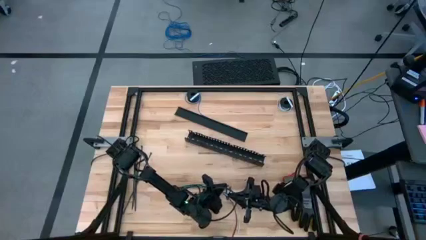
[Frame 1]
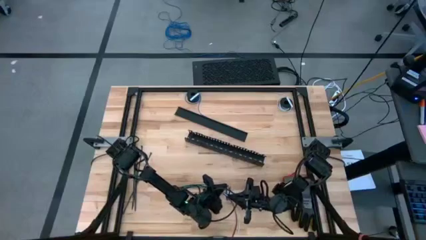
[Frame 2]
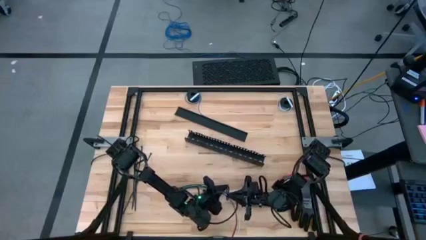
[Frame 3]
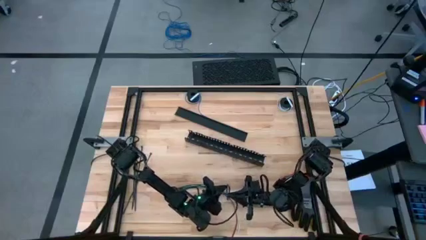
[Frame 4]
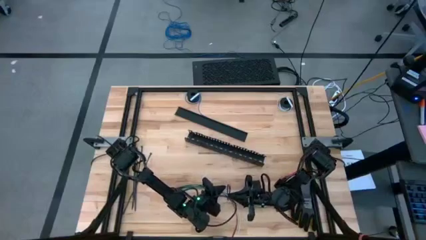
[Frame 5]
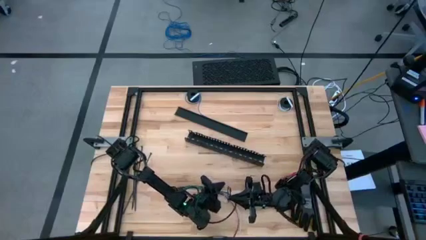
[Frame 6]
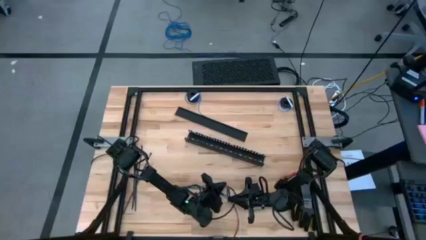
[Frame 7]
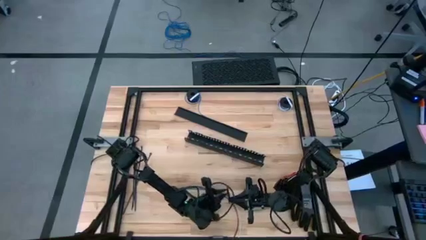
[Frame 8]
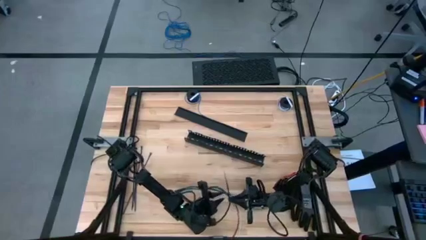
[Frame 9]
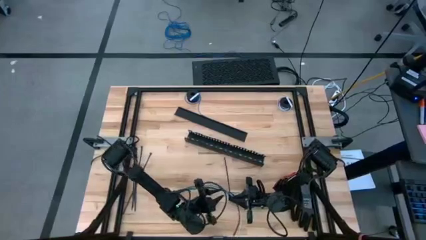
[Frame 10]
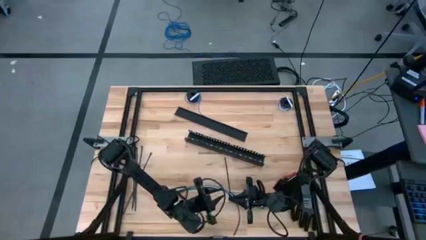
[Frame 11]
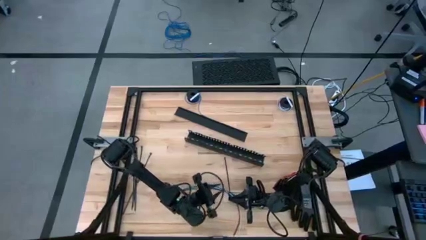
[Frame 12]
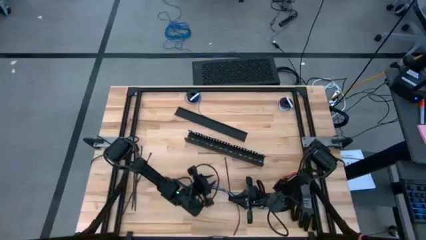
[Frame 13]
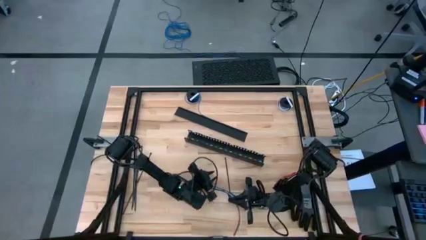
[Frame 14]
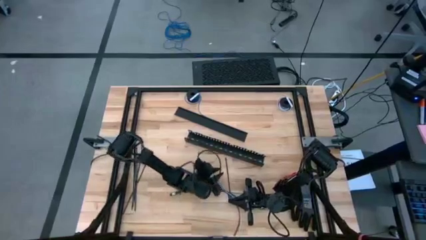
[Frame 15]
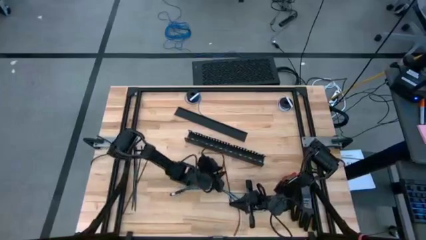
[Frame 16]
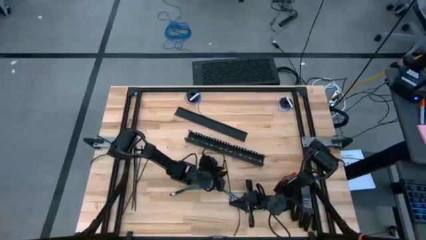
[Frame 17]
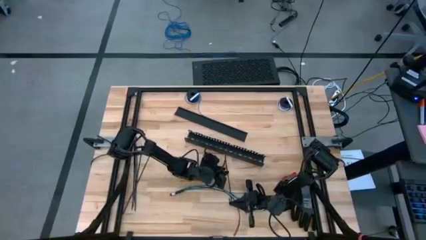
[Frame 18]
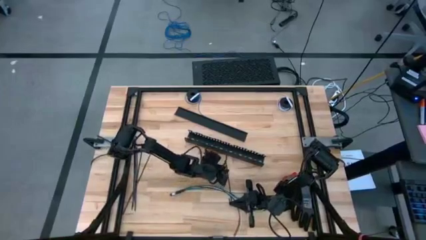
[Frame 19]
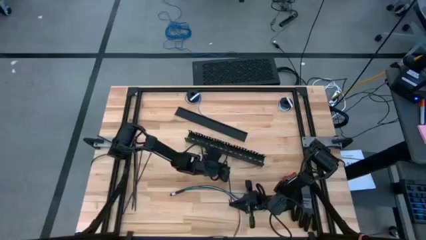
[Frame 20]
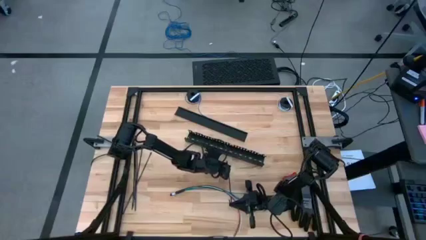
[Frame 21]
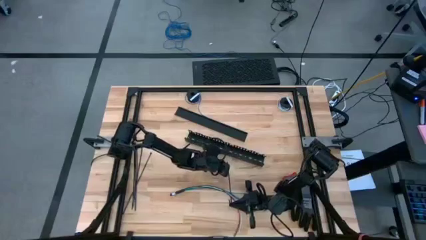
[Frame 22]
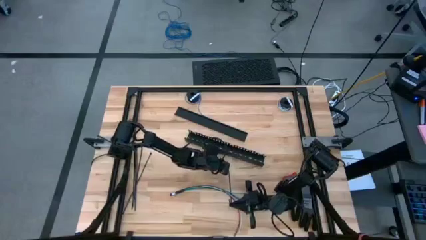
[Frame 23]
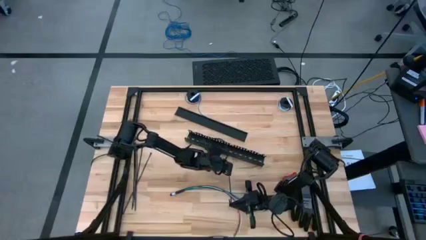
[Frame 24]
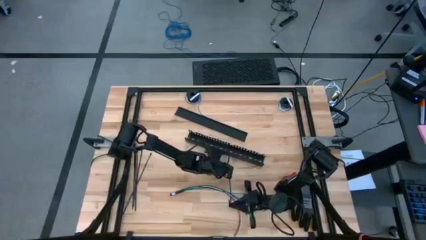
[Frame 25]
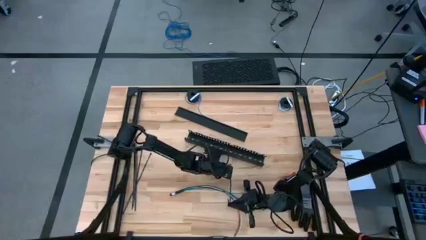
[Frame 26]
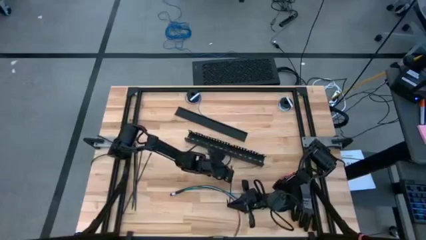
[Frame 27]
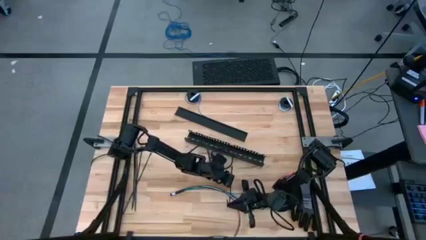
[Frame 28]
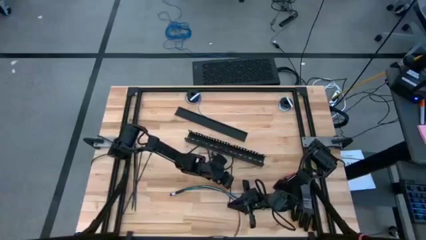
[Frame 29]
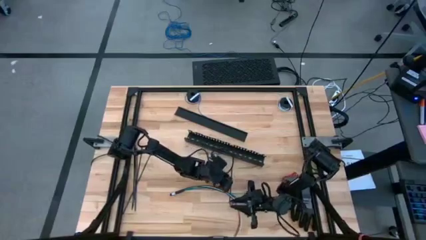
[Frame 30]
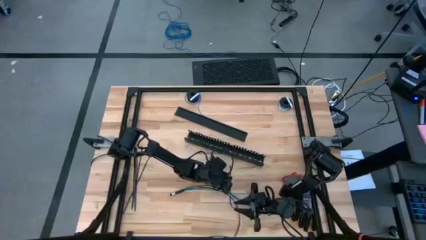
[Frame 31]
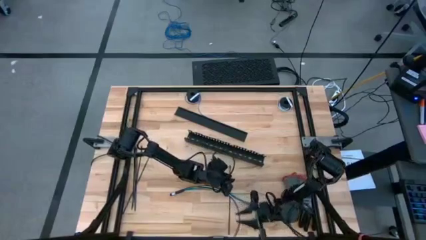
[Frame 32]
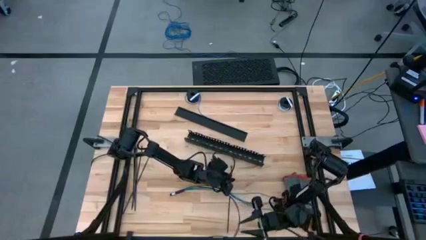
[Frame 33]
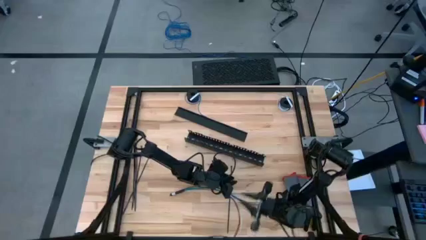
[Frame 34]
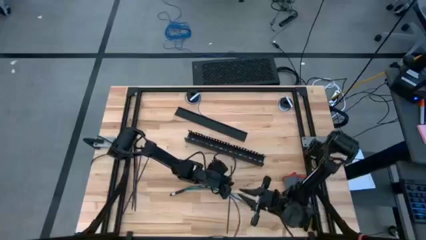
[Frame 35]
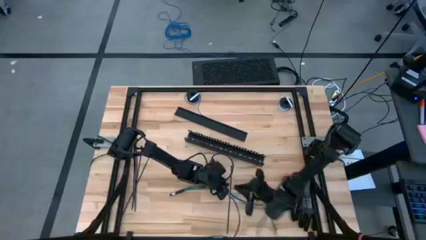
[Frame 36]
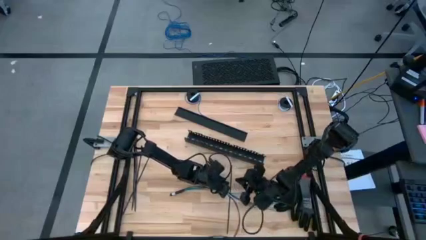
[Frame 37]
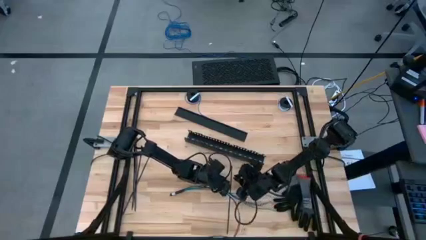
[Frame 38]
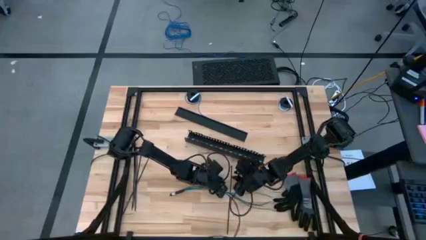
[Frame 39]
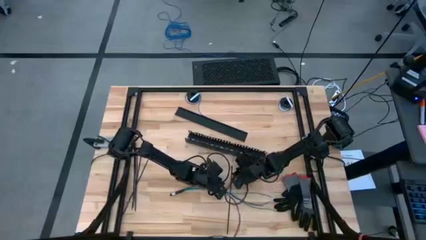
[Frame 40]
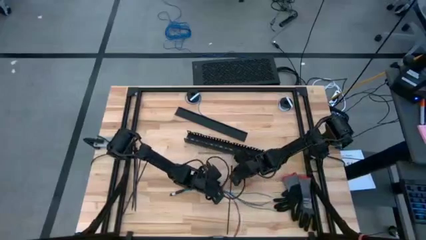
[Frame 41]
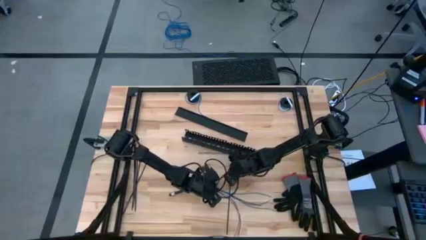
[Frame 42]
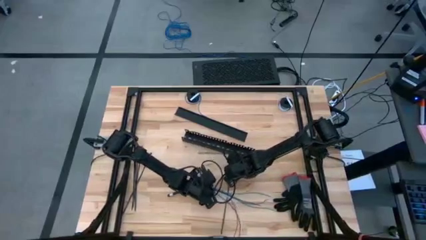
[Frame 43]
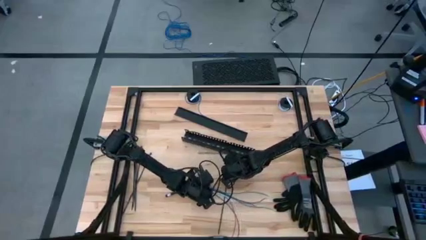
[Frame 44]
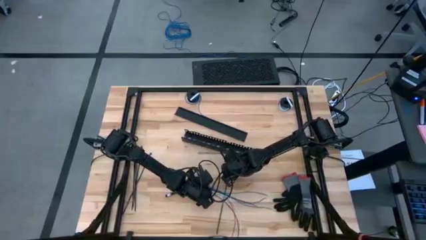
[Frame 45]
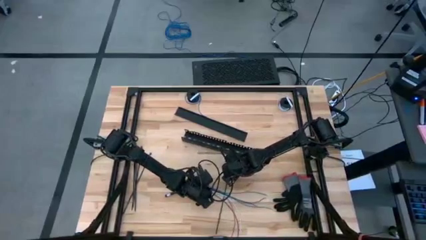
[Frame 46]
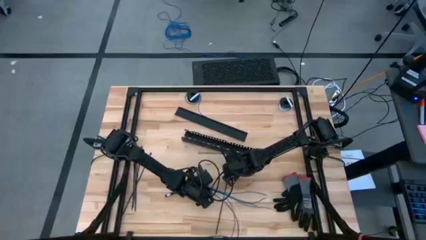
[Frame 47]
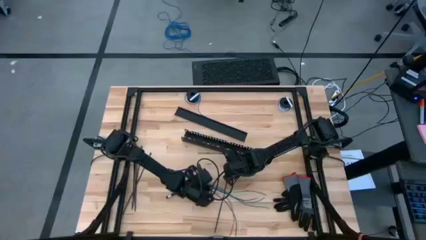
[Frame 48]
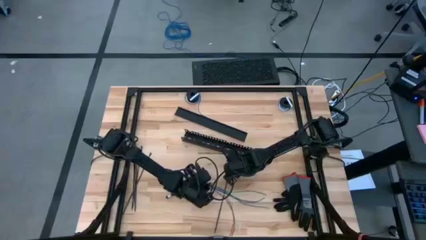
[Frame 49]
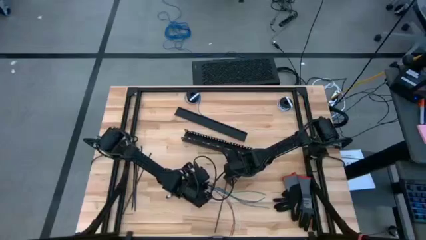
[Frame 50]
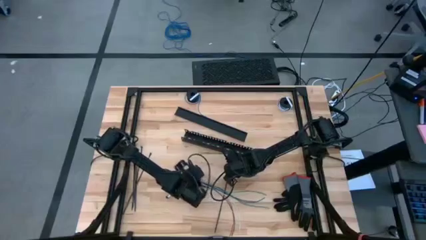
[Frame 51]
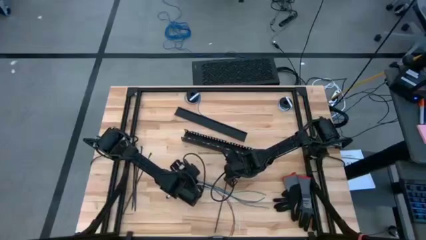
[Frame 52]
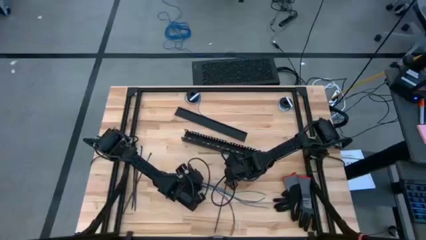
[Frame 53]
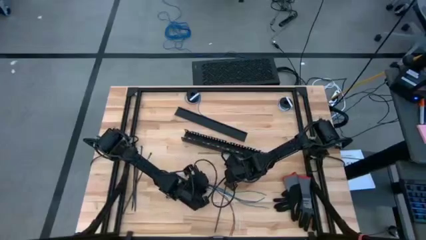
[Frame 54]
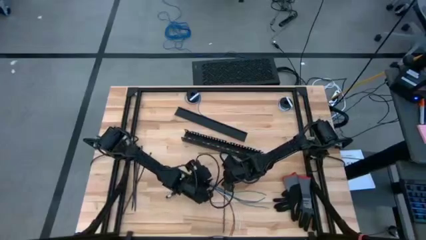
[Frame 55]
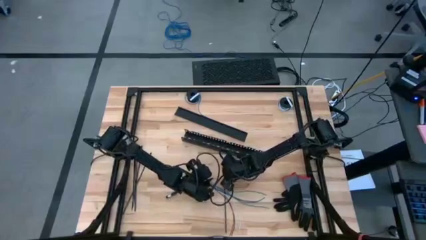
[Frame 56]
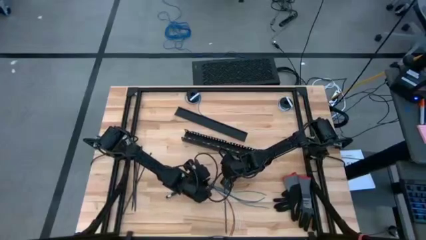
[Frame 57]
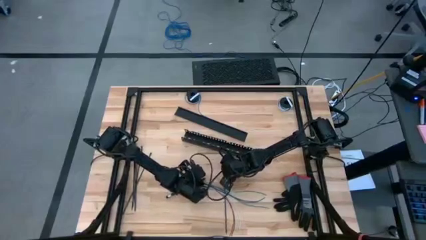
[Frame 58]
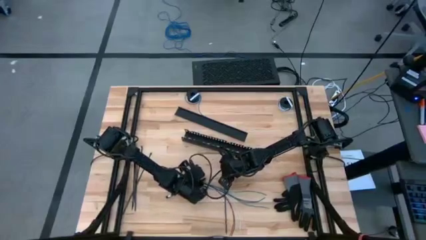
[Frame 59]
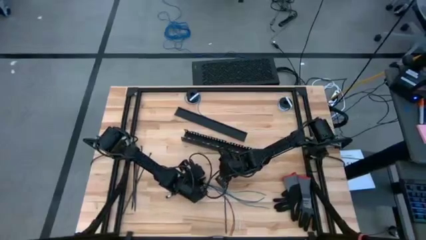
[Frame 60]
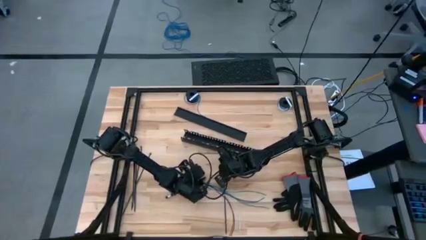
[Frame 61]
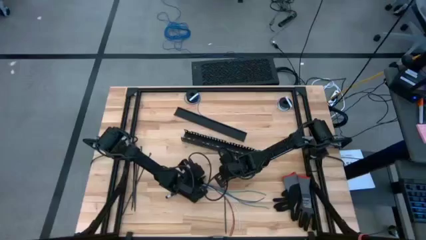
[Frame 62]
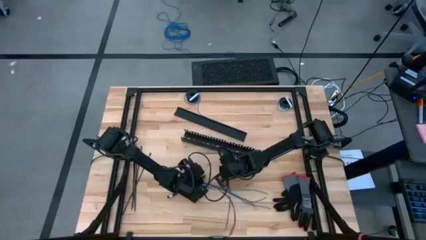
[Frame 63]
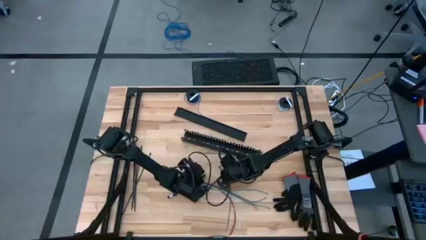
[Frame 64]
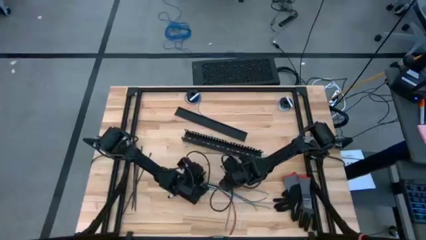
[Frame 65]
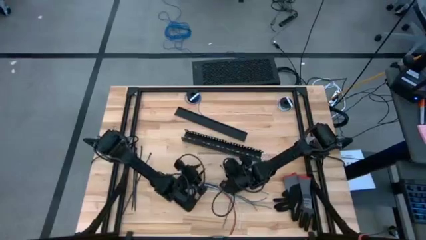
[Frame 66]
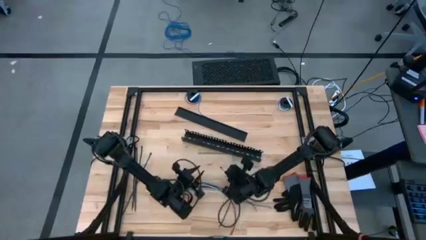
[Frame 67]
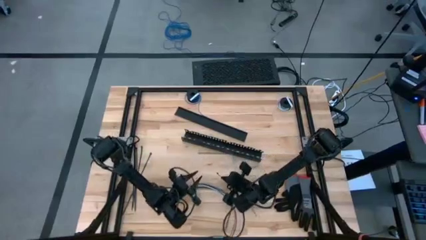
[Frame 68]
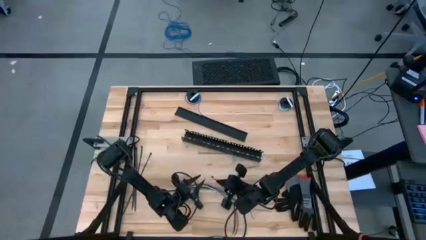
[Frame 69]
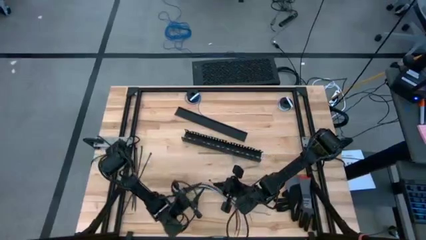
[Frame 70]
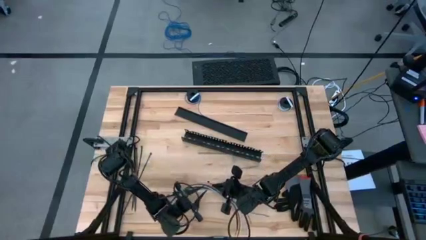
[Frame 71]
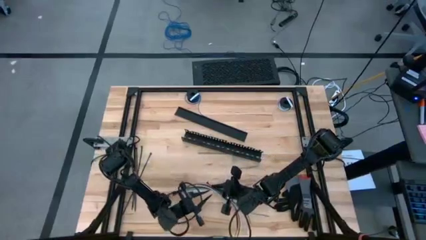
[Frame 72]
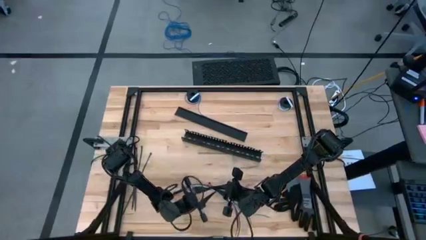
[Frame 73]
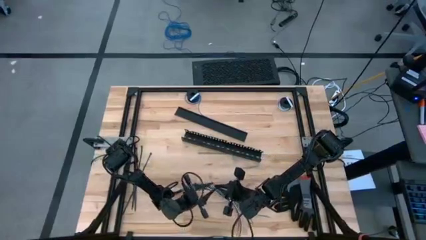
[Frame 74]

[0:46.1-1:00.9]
Task: Ziptie cables
Wrap the cable wires with the black zip tie
